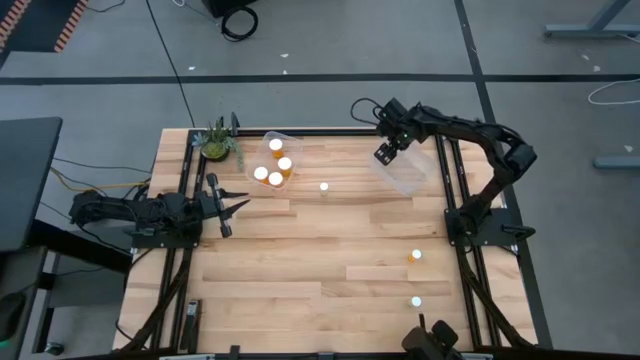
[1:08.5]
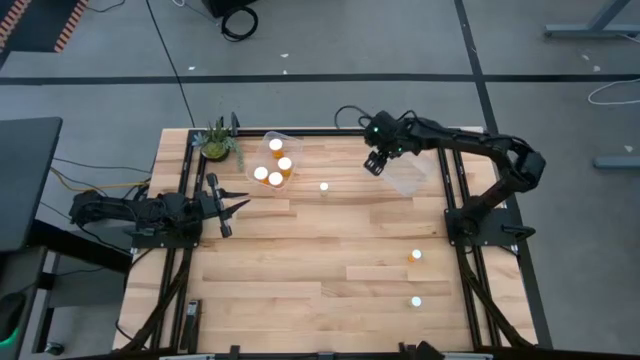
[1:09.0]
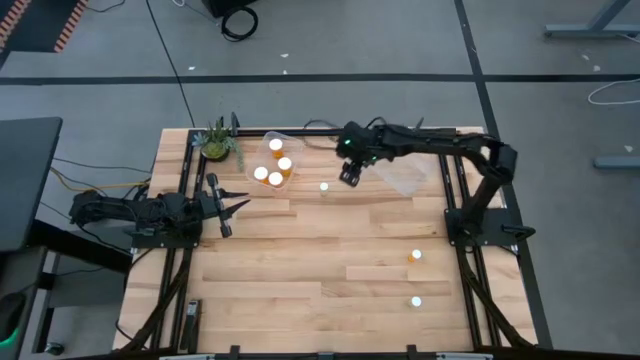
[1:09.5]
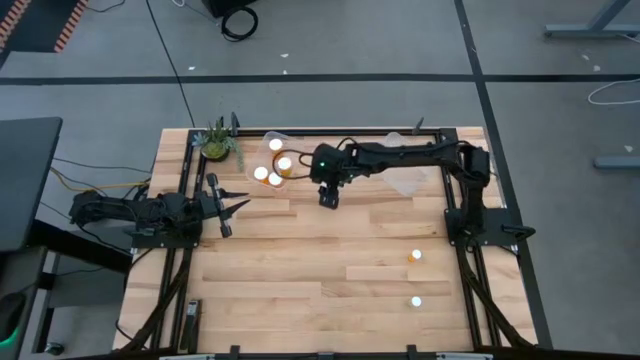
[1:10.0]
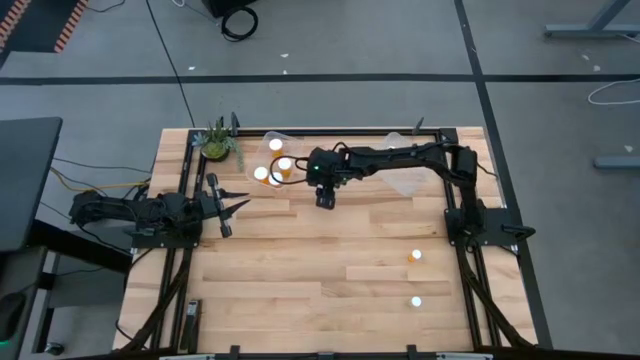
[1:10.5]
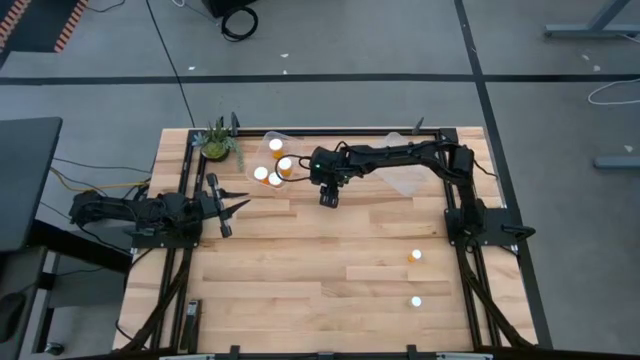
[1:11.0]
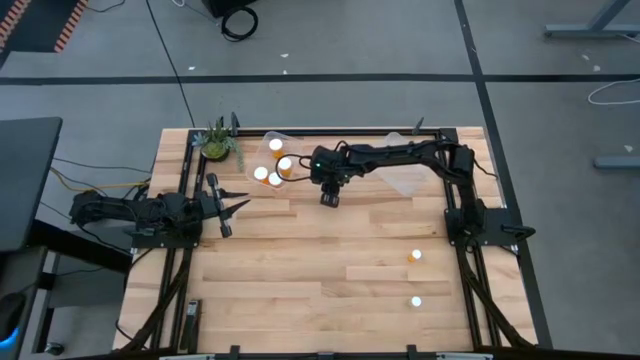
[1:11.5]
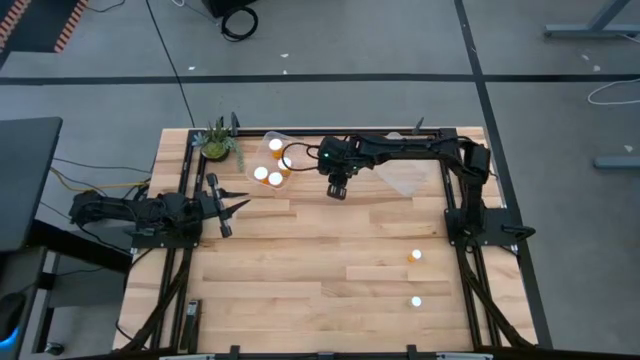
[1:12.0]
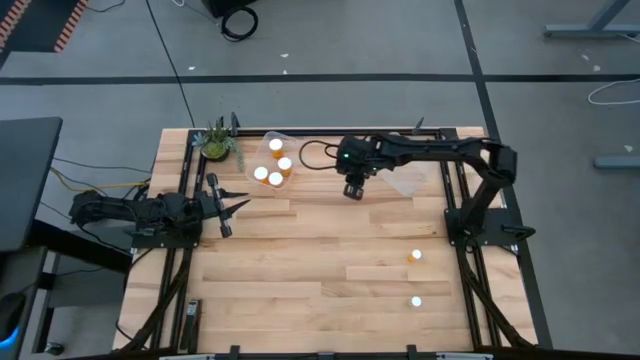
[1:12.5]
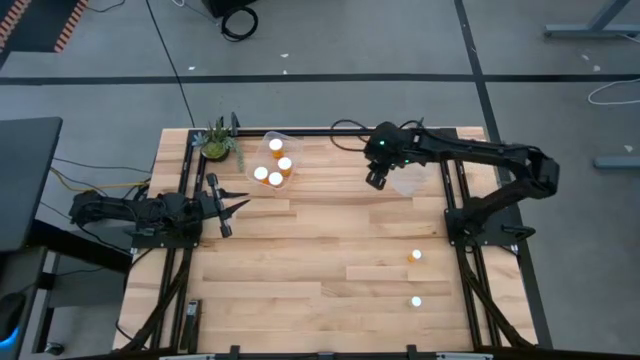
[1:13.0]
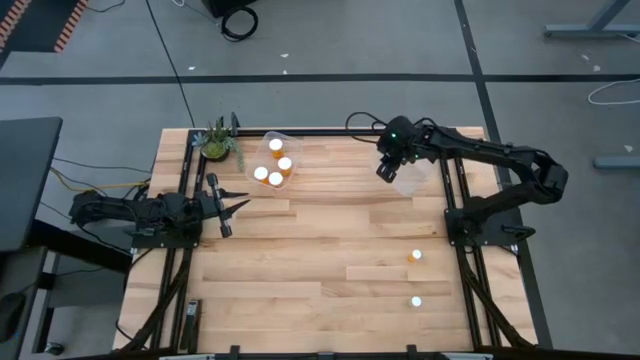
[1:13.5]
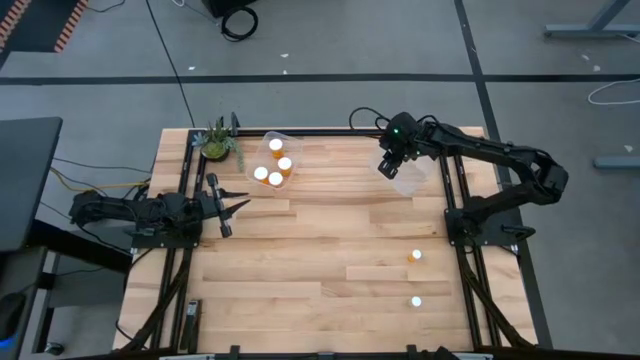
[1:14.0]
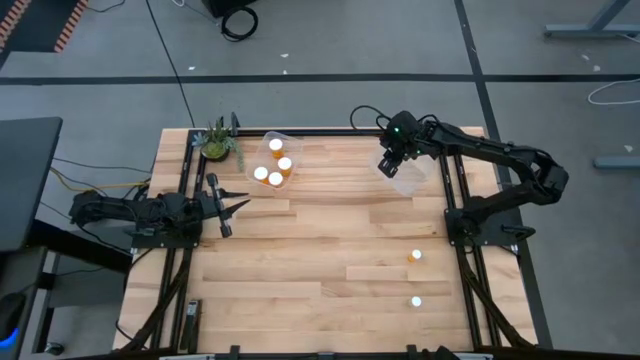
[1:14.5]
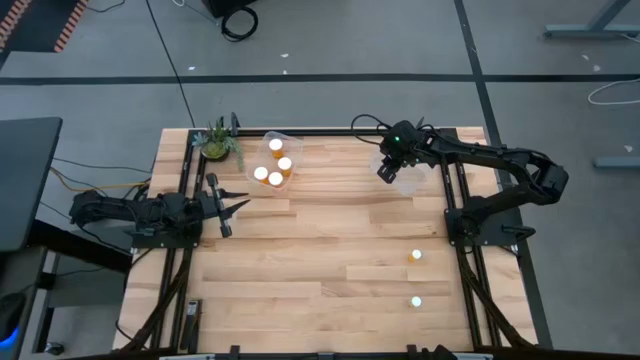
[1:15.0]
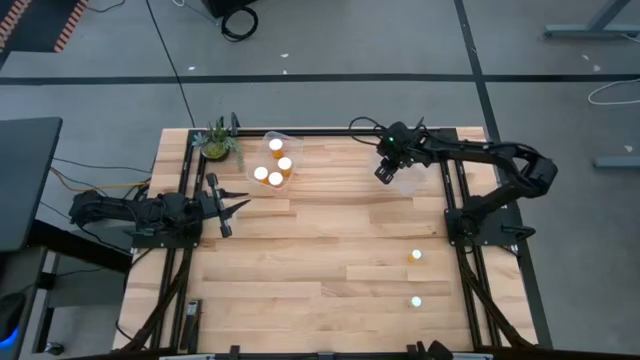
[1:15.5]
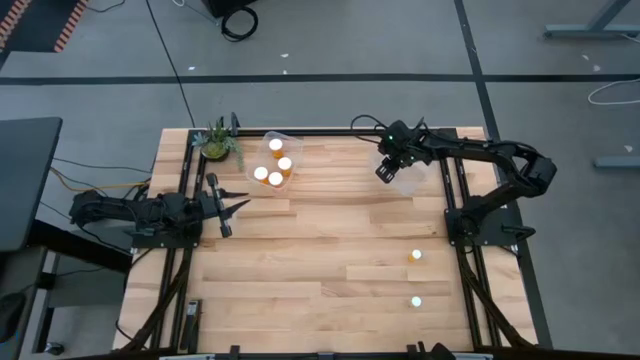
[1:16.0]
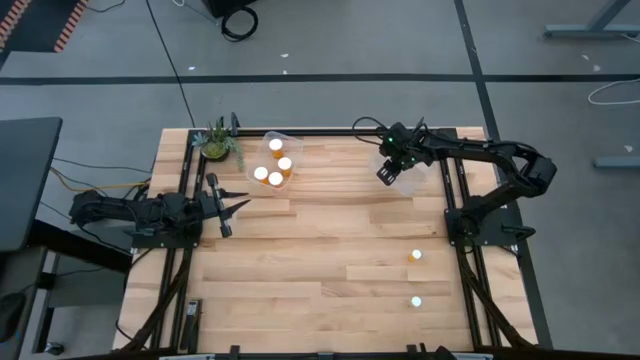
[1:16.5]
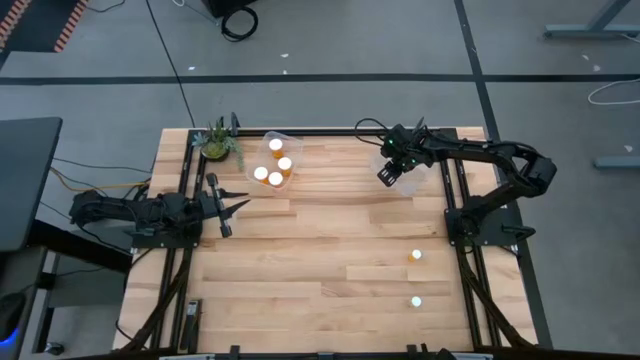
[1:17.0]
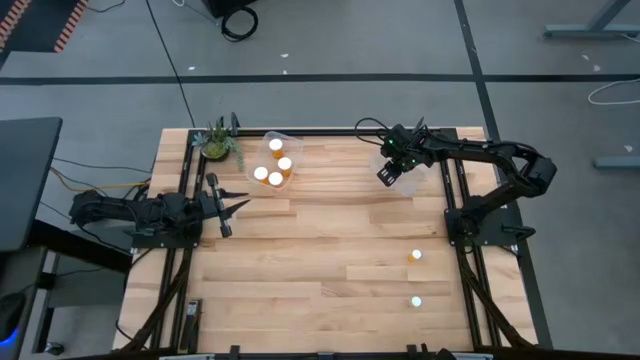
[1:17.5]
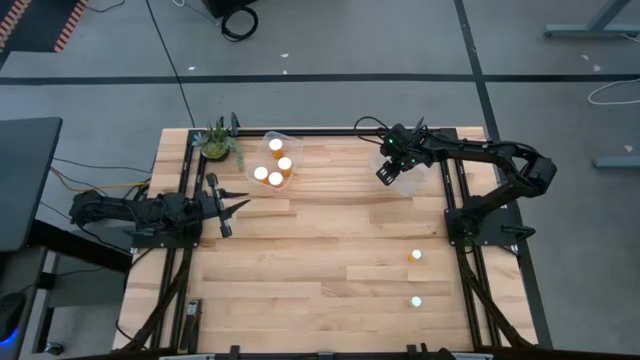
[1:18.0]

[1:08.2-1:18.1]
Task: Pick and place medicine bottles into bin by pill shape (circle, oval)
Put the small yellow pill bottle into the right transparent bin

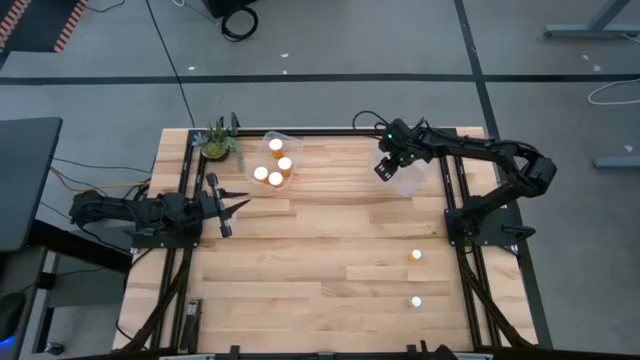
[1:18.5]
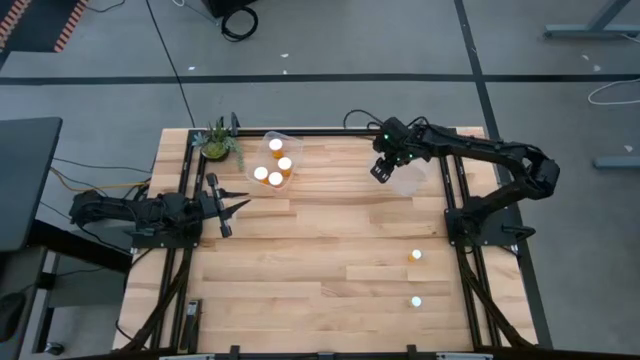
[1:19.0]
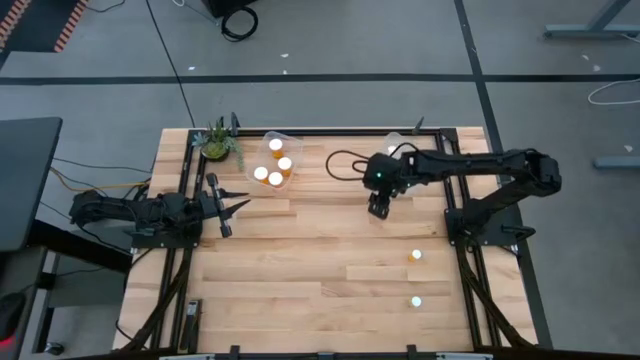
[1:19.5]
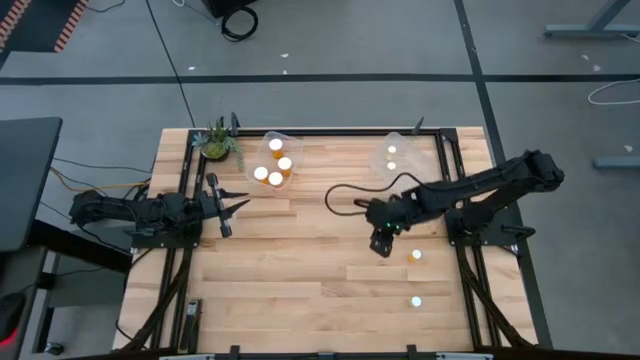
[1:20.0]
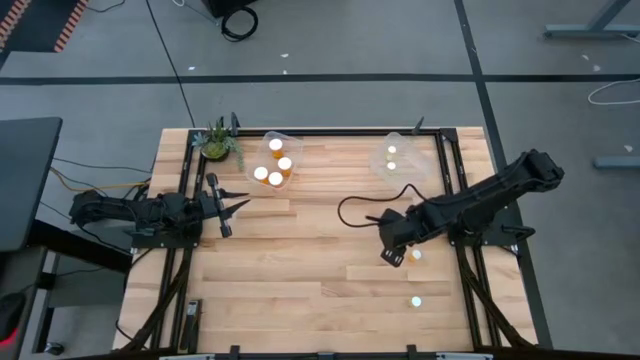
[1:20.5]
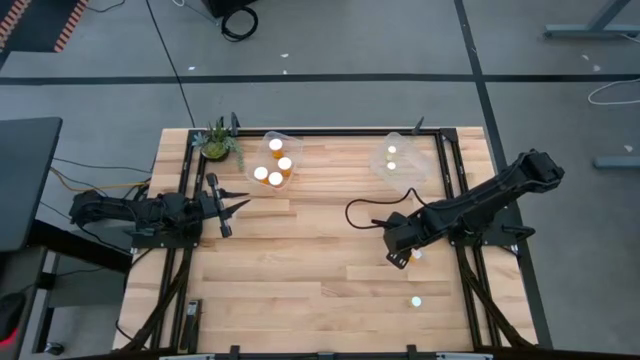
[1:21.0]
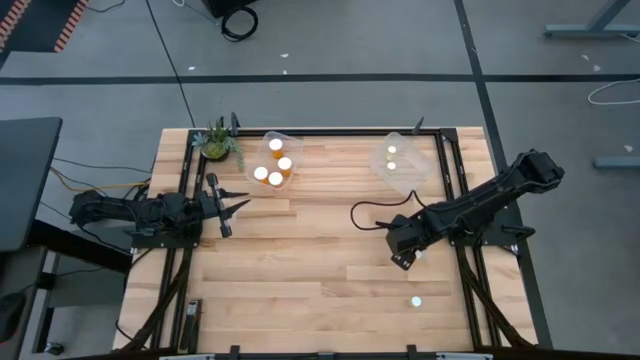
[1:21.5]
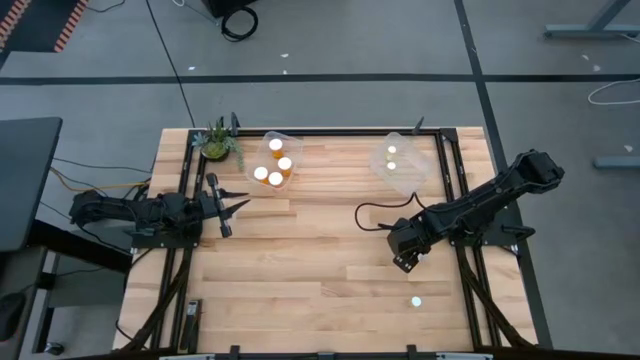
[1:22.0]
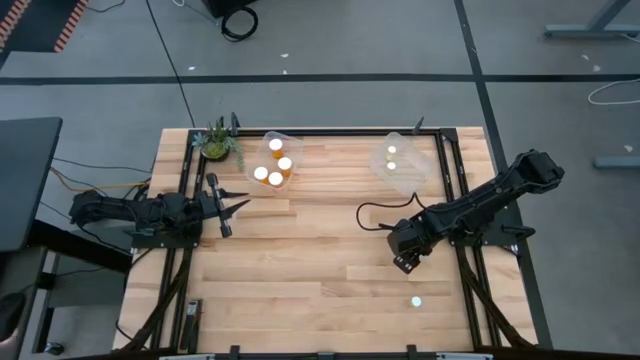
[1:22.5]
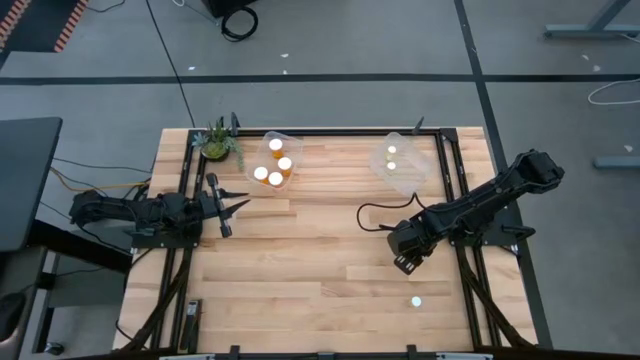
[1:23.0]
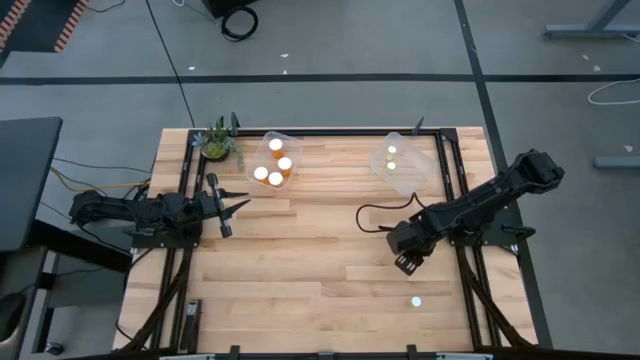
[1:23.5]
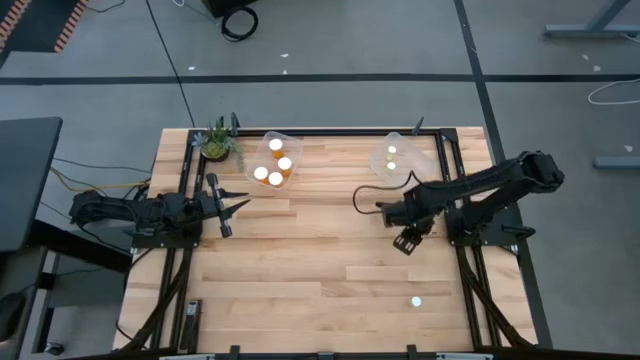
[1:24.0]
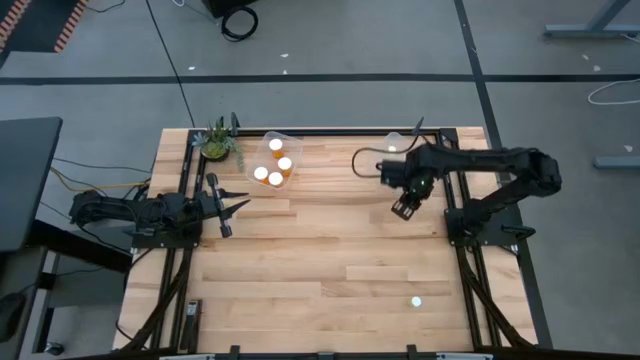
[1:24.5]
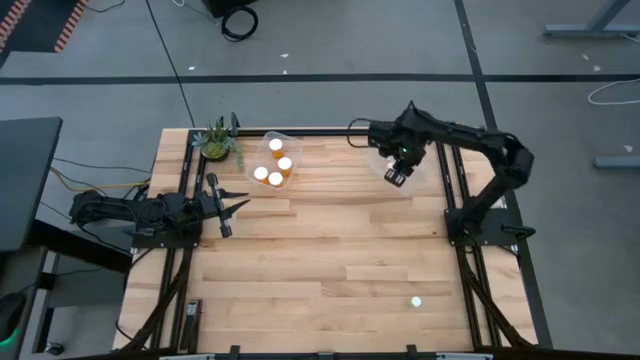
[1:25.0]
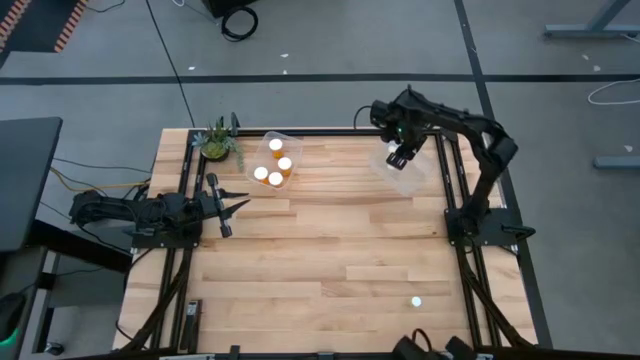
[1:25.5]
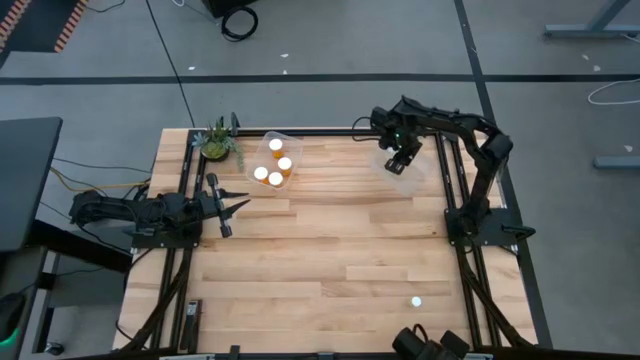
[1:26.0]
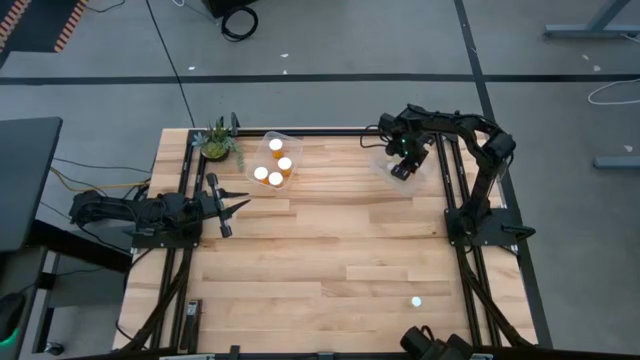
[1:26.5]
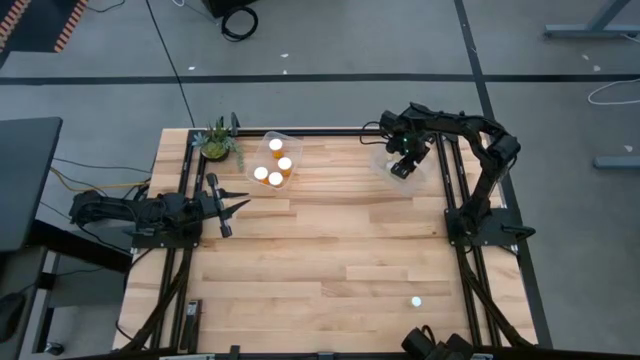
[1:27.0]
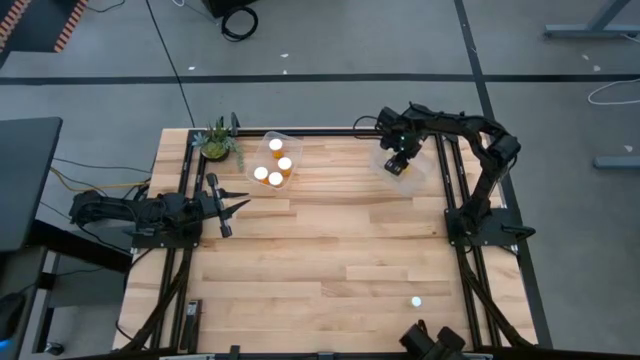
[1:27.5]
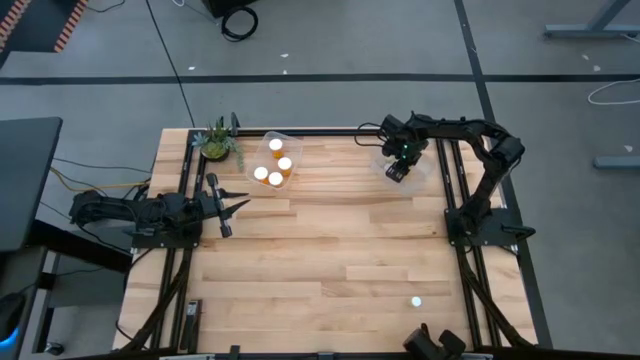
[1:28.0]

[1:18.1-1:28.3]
Put the small orange pill bottle into the right transparent bin
